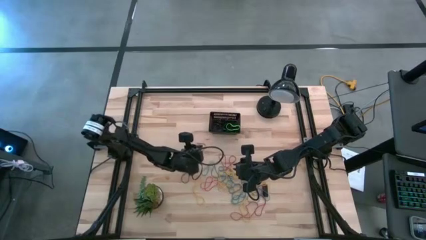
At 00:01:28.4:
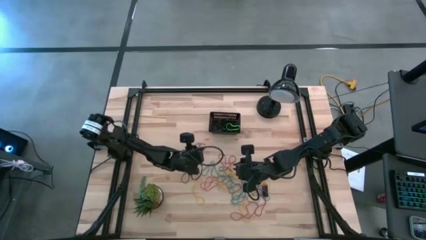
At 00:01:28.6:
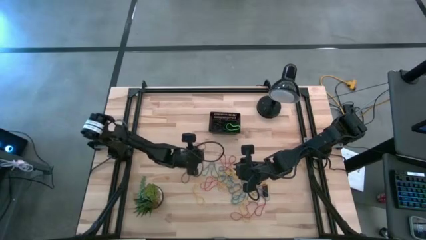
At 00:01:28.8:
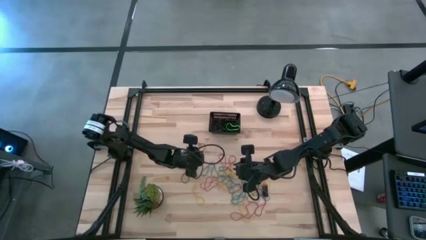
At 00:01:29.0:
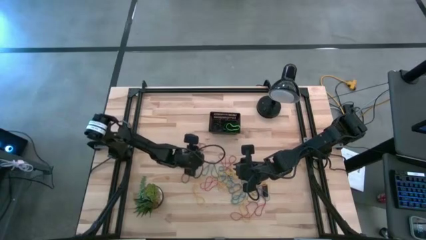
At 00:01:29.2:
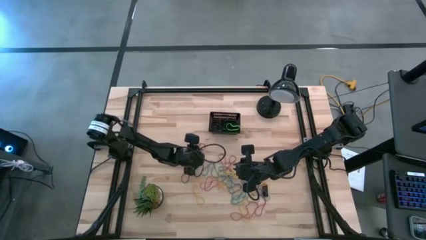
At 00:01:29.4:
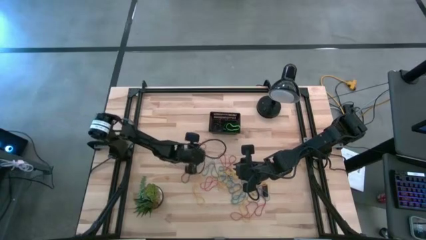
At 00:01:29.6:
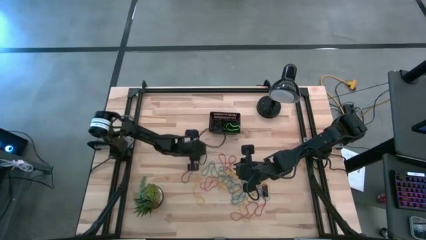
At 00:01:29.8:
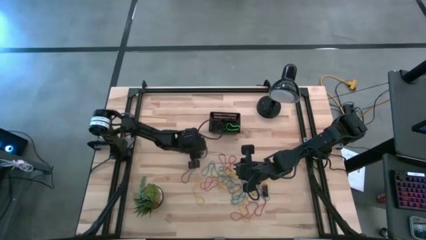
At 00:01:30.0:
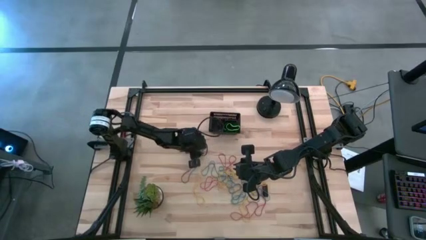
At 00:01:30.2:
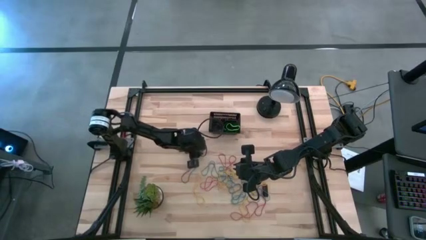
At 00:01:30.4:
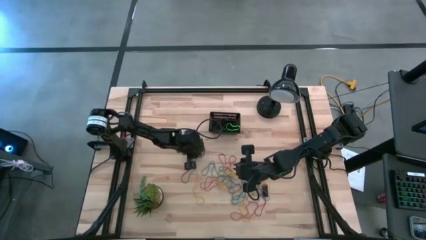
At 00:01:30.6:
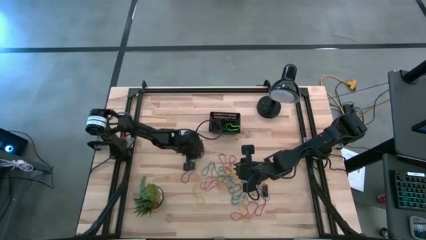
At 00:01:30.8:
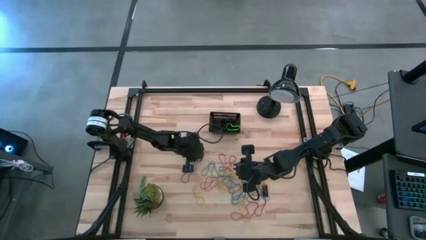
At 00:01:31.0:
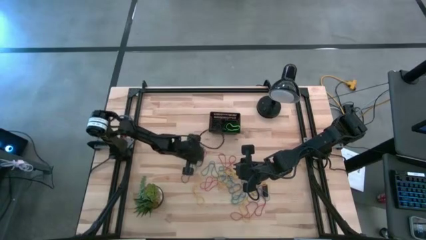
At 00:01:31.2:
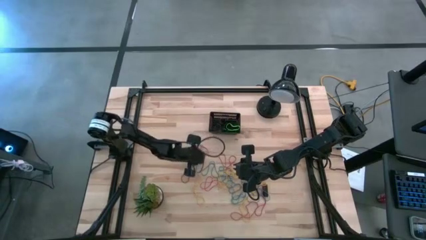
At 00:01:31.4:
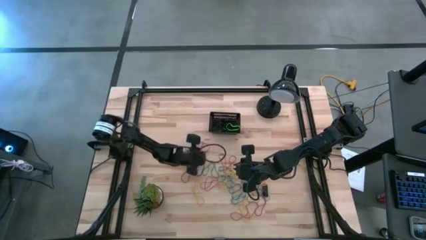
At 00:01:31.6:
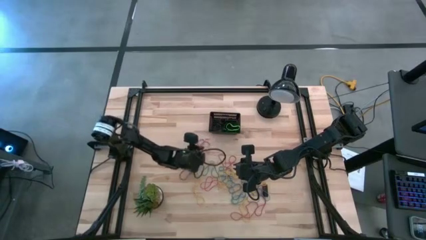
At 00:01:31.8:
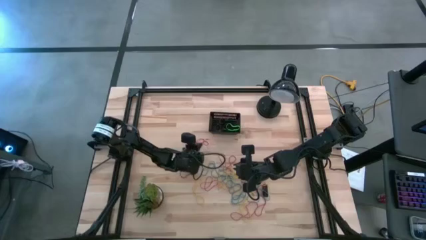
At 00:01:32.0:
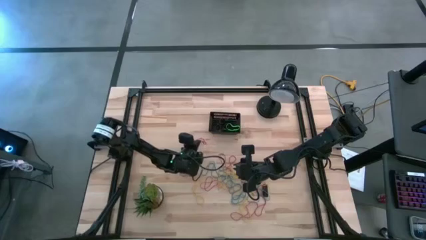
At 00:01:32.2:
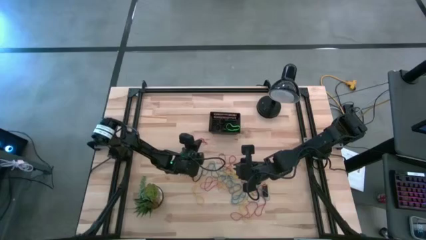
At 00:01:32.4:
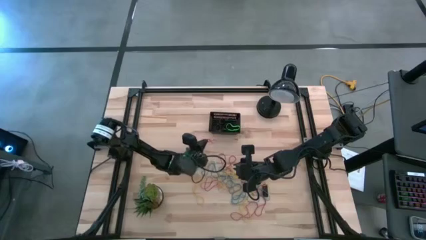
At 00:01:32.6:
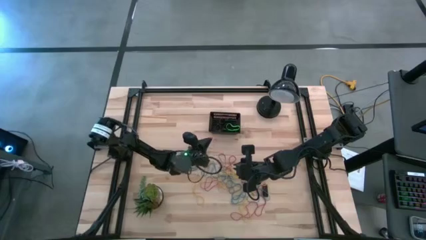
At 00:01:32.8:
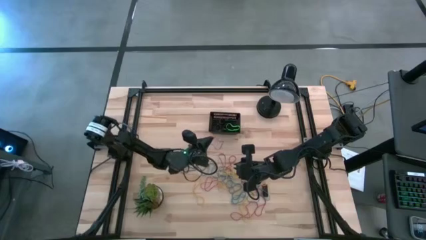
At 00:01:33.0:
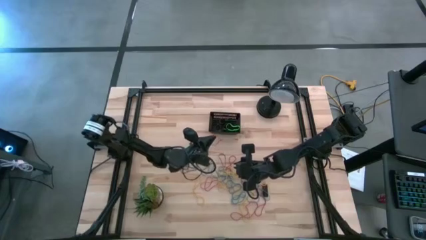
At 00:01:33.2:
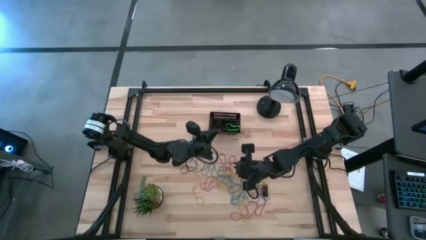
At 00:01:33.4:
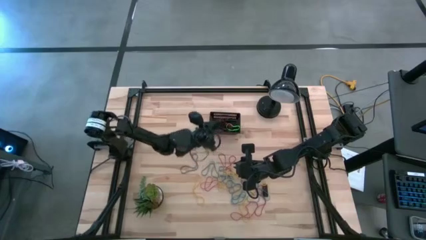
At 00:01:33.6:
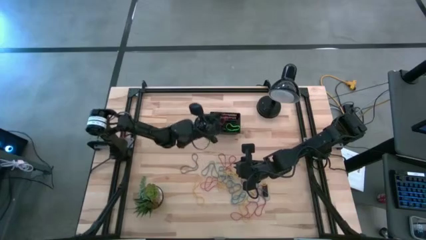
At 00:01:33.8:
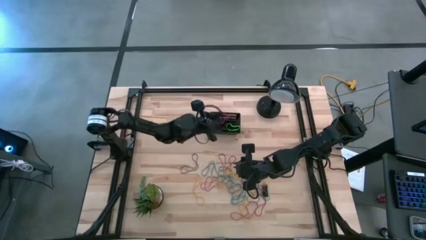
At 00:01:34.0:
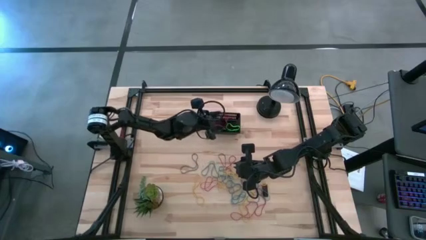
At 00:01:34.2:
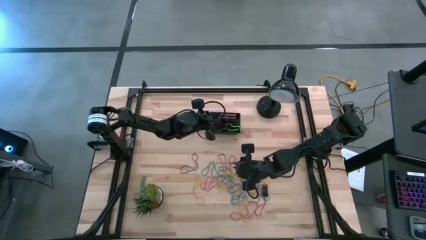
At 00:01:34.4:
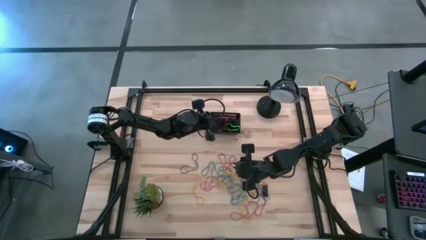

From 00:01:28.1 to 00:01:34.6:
Task: Pick and place rubber bands into bin
Put the red rubber band into the basket

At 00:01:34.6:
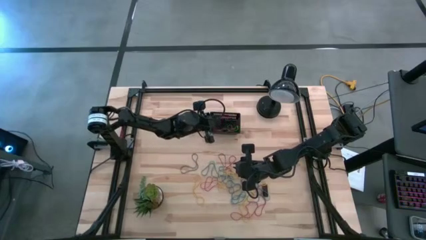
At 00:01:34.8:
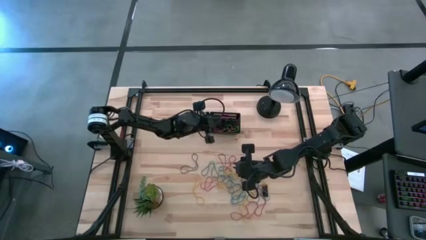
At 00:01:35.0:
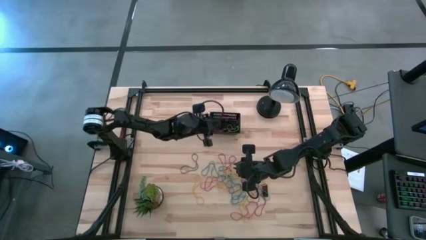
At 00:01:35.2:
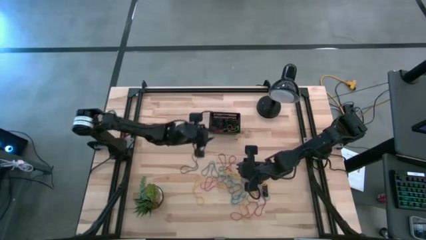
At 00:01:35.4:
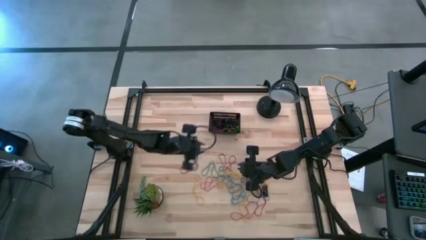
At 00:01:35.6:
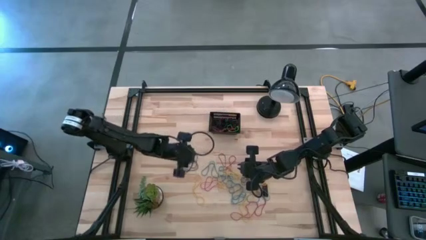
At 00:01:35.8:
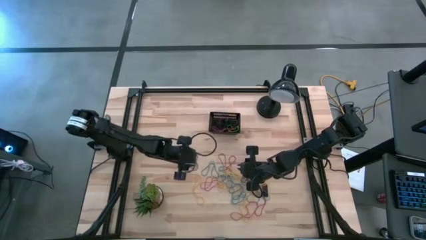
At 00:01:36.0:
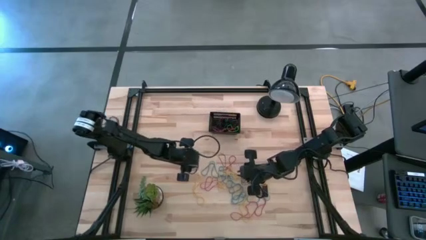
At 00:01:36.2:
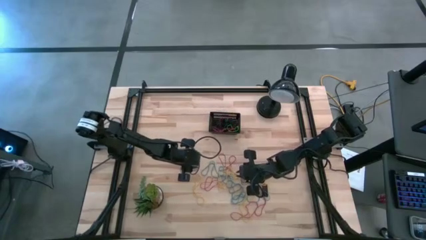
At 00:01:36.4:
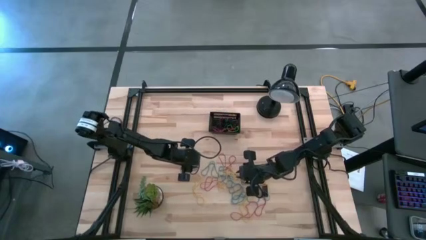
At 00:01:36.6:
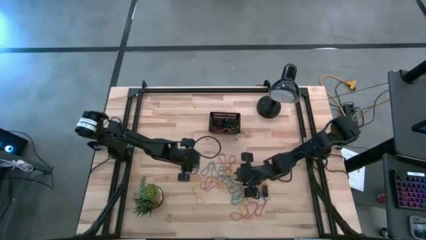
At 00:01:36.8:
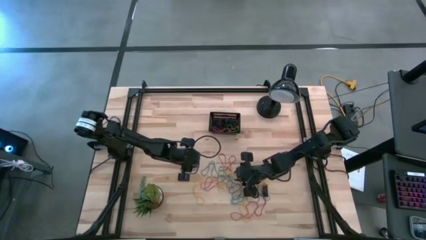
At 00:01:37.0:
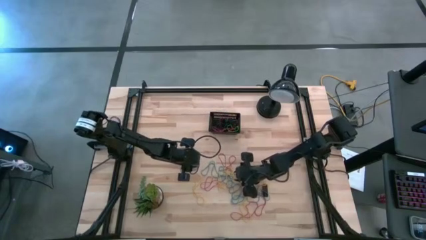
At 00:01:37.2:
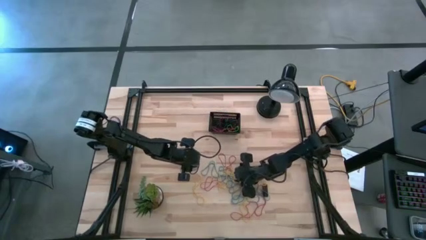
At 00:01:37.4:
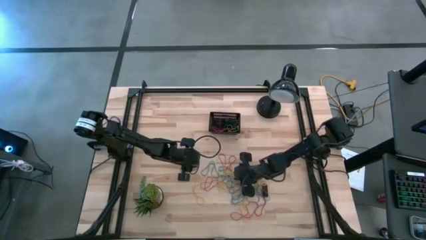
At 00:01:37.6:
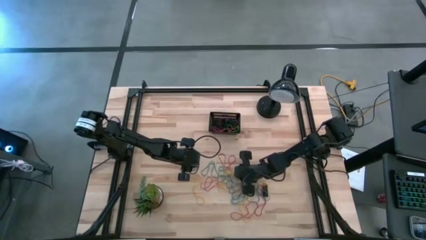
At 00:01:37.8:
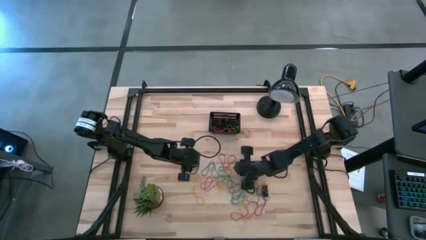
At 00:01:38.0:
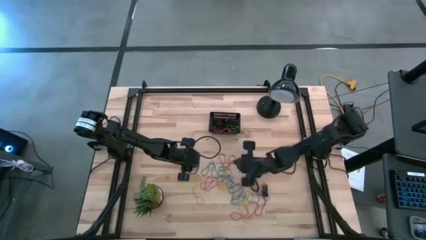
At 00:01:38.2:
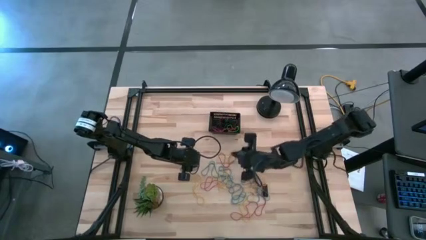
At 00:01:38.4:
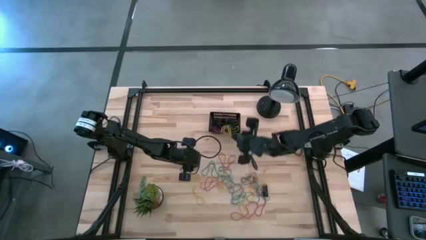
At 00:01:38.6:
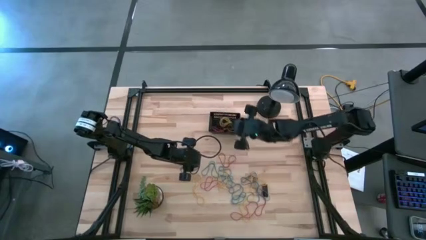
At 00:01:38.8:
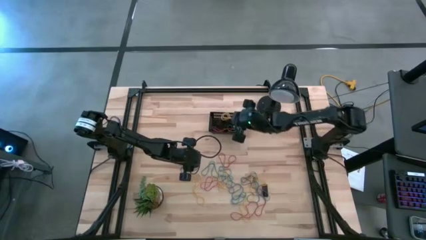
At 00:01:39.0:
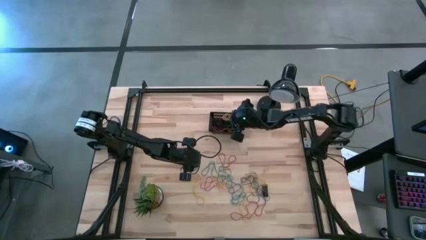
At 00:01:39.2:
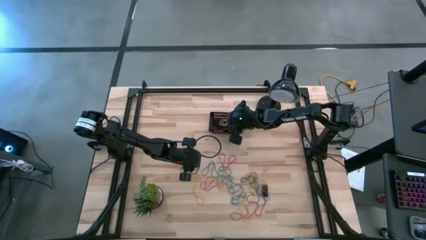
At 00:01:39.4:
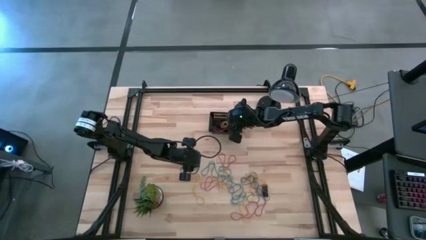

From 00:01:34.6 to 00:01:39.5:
Put the yellow rubber band into the basket

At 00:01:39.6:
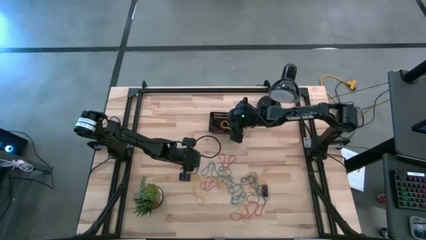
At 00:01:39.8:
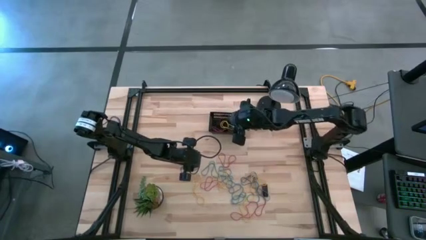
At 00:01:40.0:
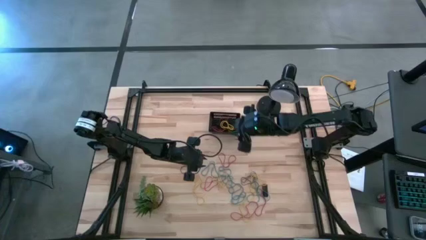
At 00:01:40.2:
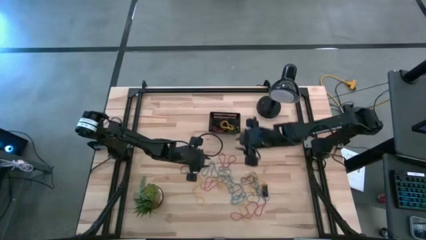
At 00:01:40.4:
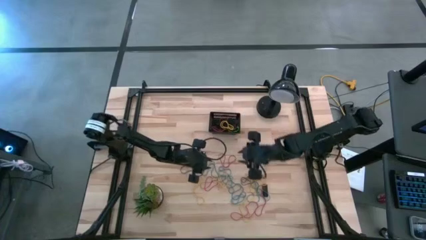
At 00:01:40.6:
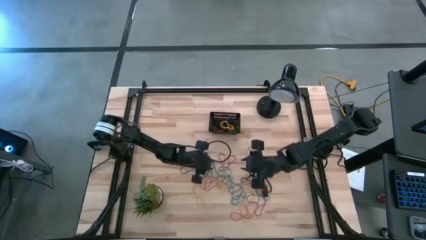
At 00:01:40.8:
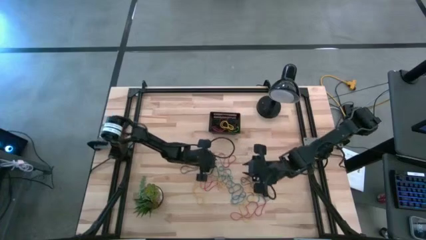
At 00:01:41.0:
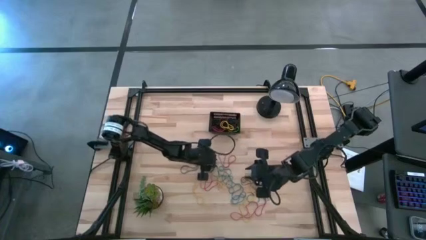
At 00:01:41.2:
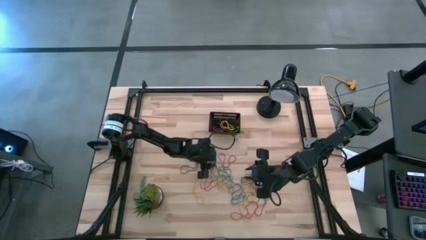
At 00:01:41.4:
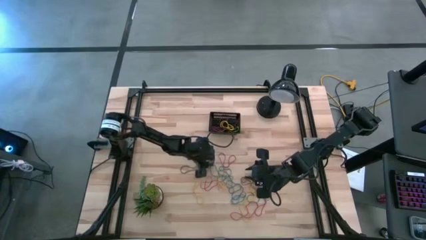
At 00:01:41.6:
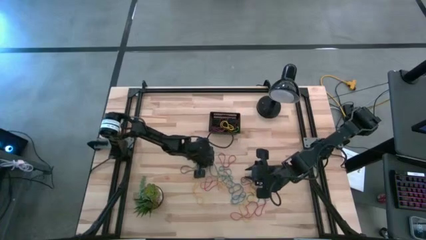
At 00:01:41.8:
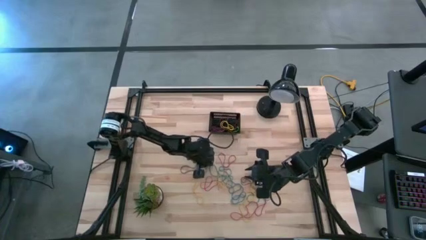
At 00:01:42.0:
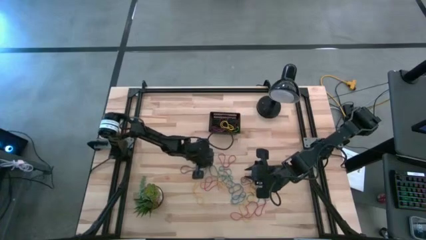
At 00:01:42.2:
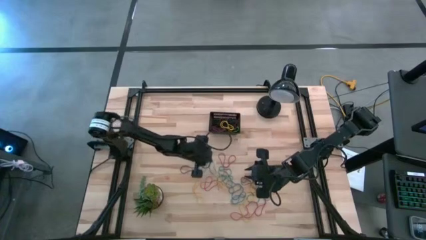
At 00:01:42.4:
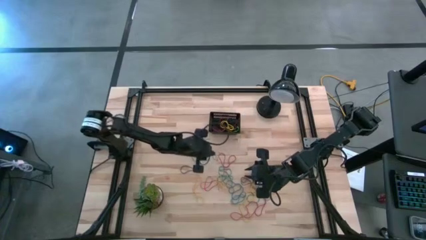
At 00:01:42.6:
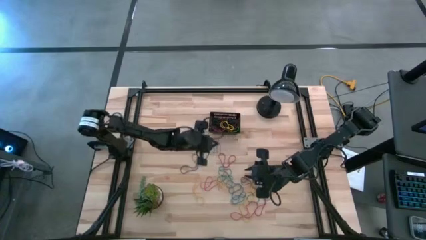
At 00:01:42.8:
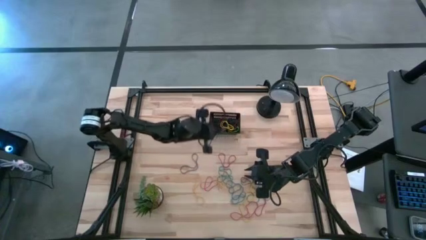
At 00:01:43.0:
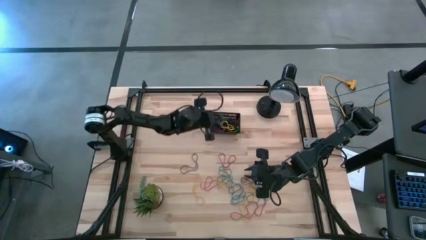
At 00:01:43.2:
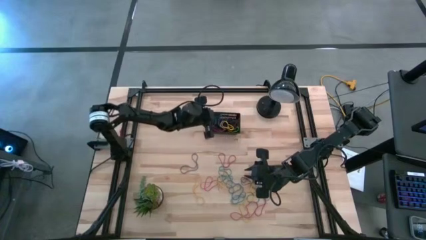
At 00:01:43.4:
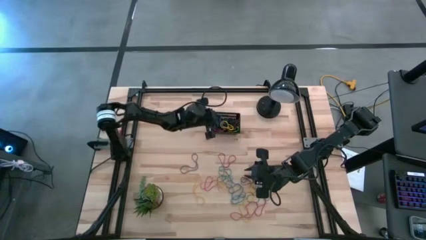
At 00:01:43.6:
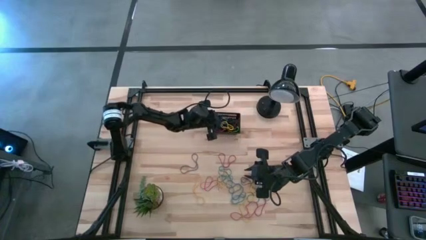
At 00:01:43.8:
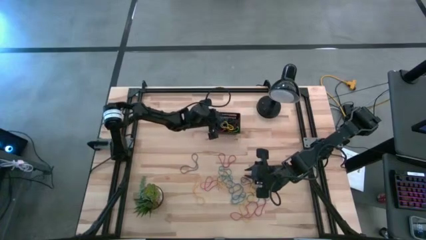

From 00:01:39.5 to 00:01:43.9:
Put the blue rubber band into the basket
